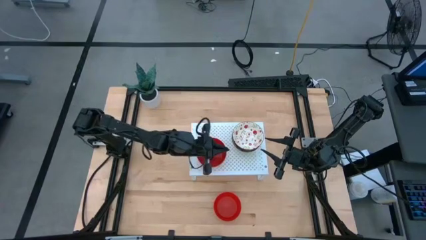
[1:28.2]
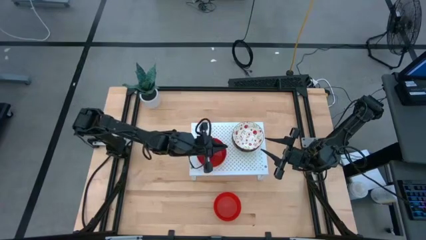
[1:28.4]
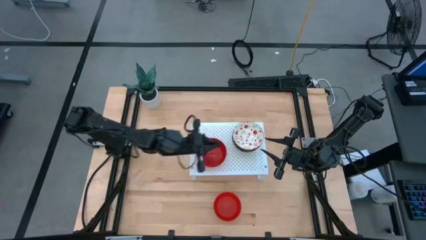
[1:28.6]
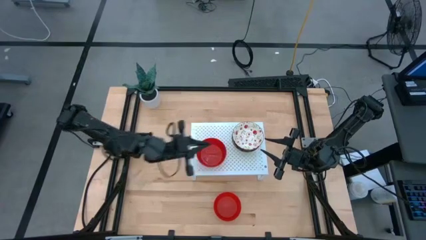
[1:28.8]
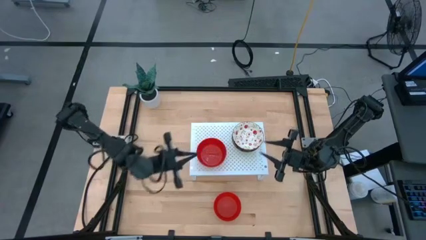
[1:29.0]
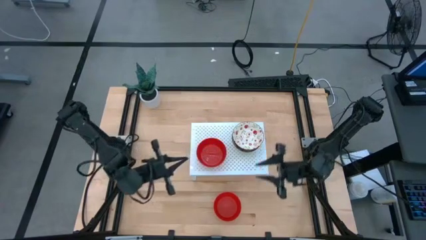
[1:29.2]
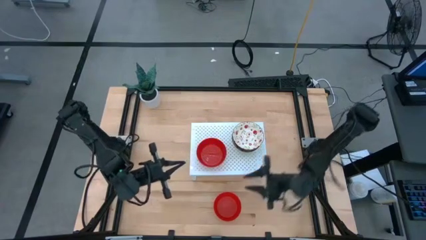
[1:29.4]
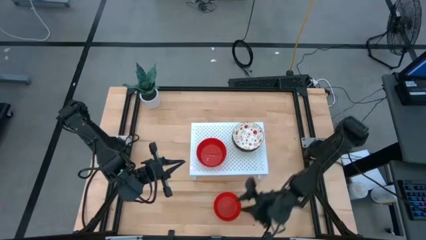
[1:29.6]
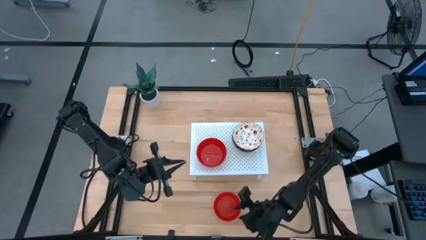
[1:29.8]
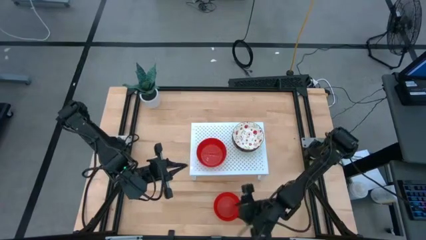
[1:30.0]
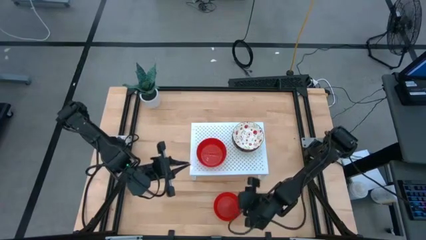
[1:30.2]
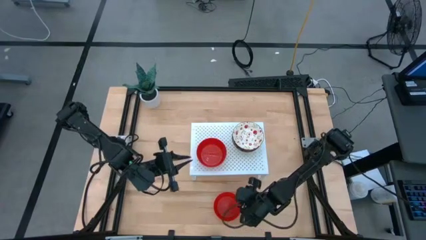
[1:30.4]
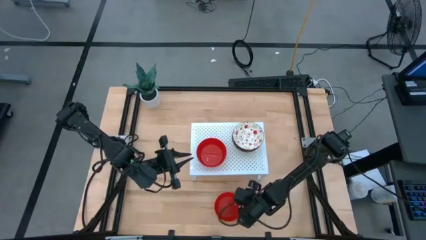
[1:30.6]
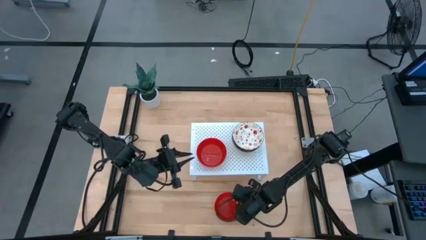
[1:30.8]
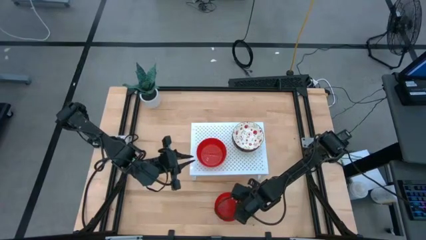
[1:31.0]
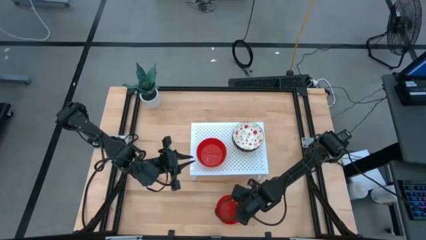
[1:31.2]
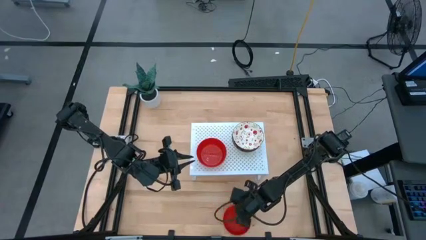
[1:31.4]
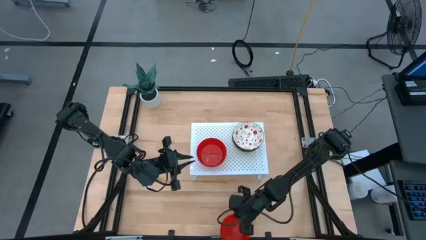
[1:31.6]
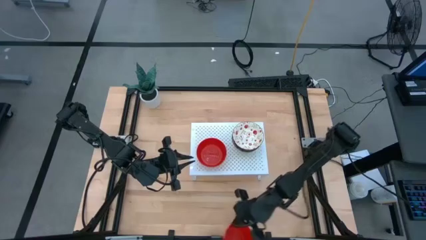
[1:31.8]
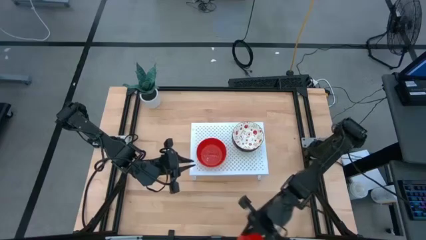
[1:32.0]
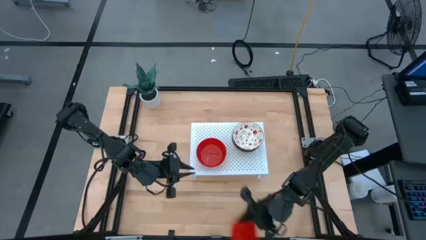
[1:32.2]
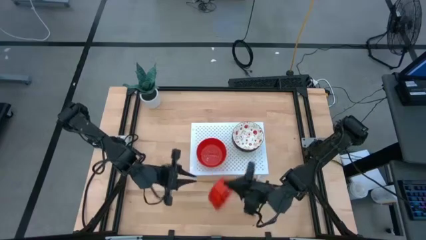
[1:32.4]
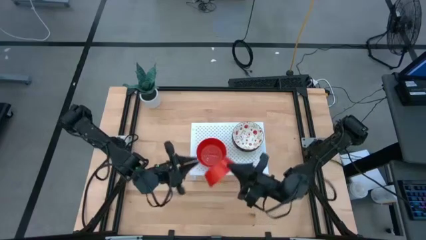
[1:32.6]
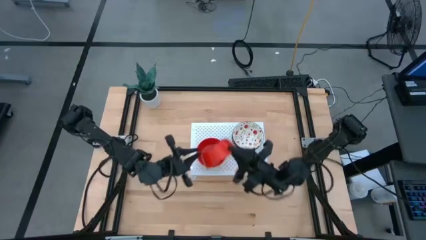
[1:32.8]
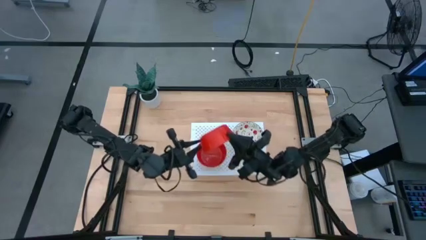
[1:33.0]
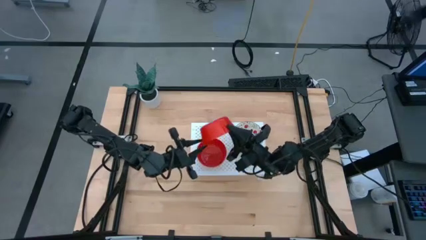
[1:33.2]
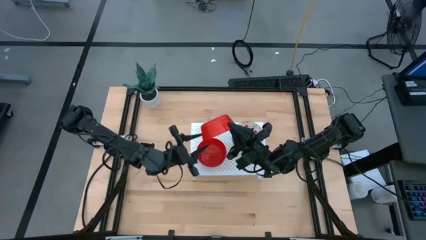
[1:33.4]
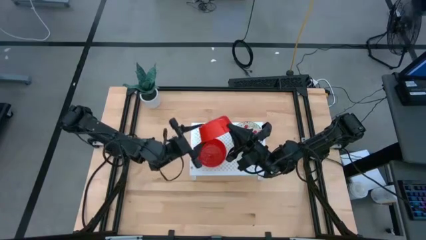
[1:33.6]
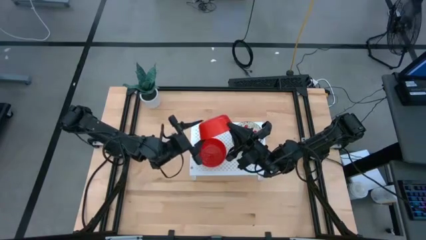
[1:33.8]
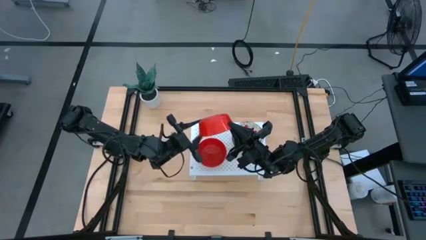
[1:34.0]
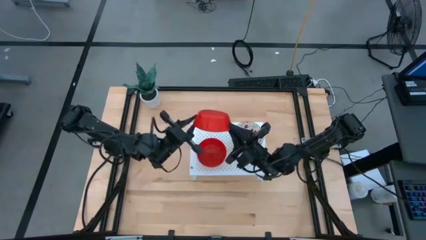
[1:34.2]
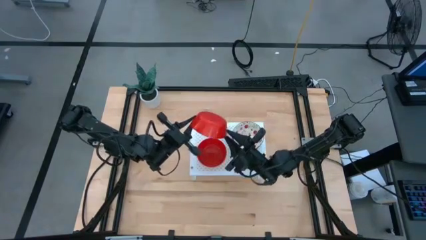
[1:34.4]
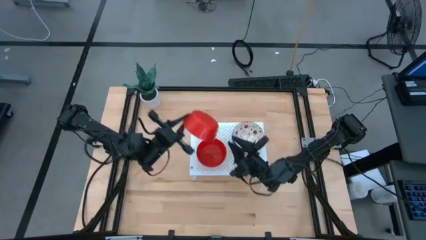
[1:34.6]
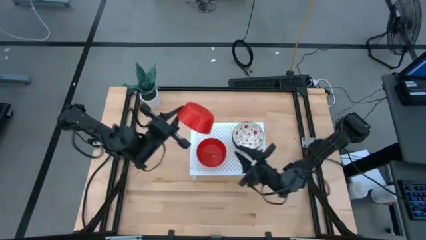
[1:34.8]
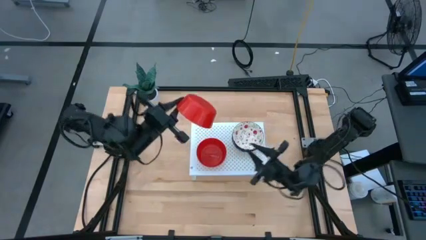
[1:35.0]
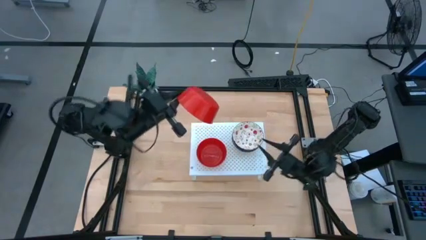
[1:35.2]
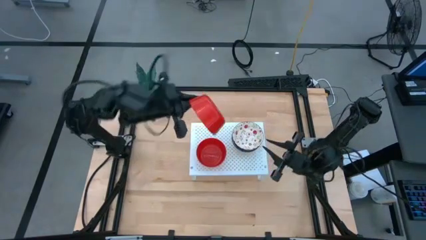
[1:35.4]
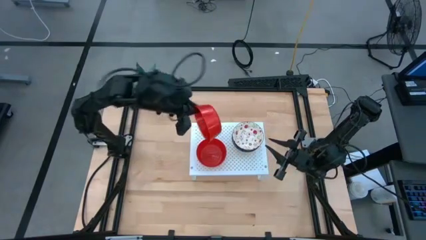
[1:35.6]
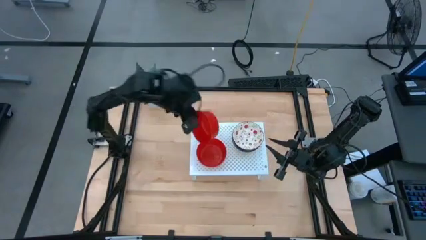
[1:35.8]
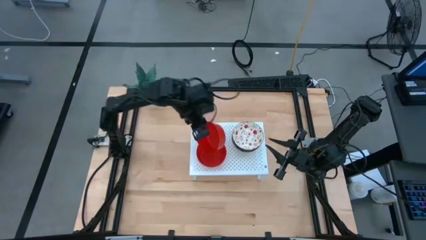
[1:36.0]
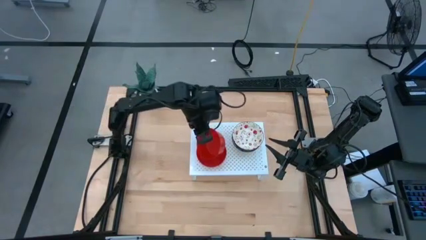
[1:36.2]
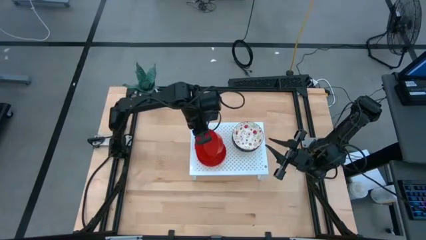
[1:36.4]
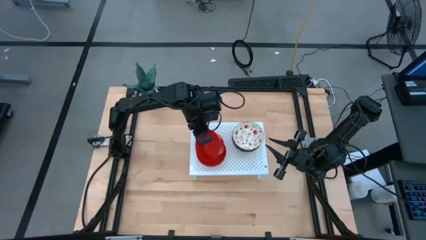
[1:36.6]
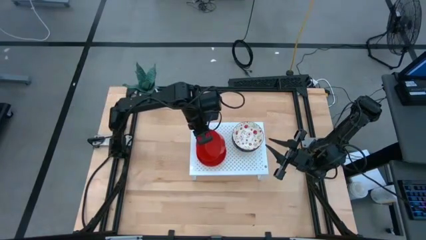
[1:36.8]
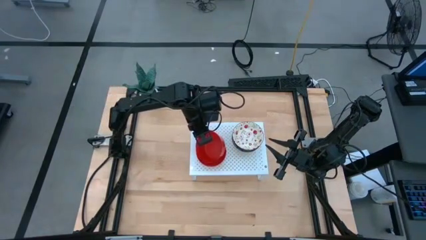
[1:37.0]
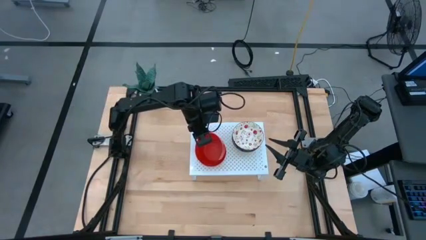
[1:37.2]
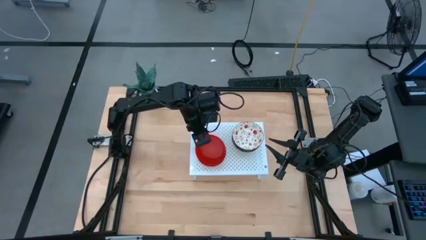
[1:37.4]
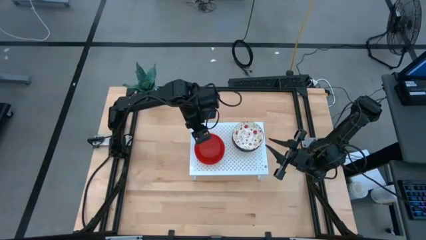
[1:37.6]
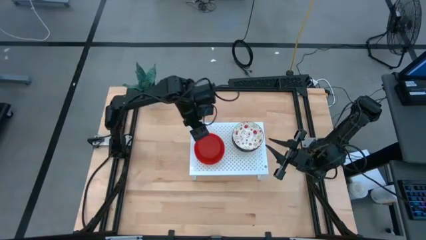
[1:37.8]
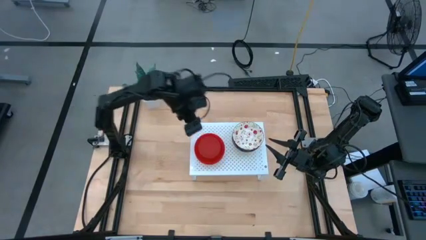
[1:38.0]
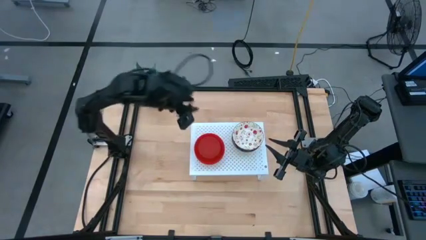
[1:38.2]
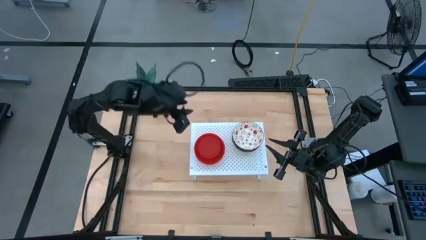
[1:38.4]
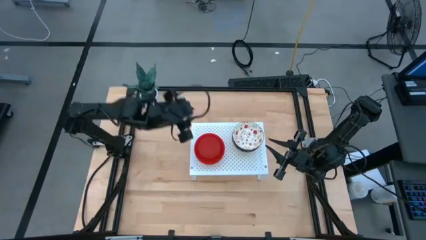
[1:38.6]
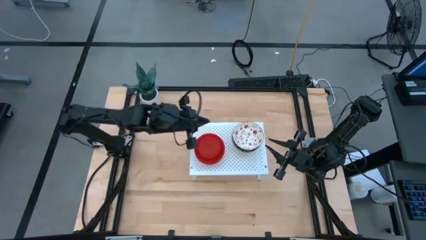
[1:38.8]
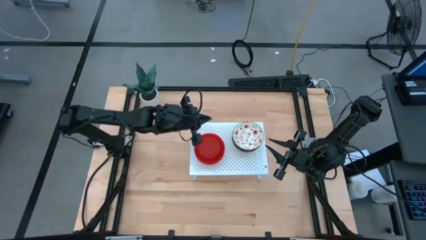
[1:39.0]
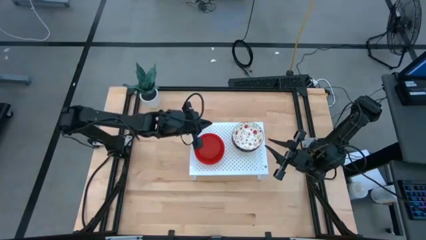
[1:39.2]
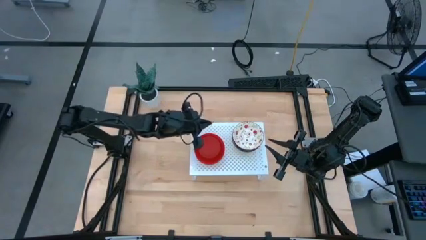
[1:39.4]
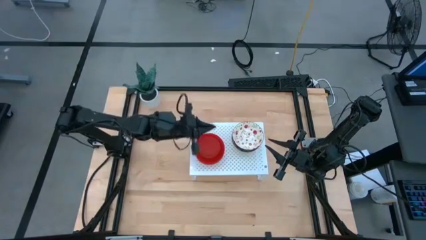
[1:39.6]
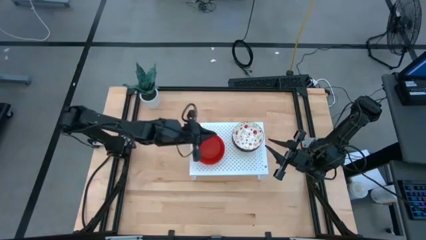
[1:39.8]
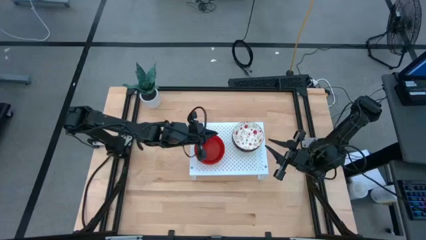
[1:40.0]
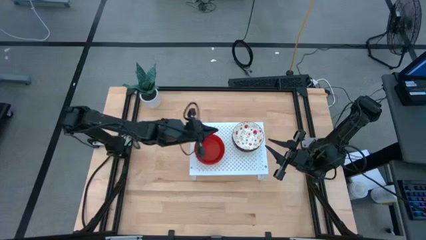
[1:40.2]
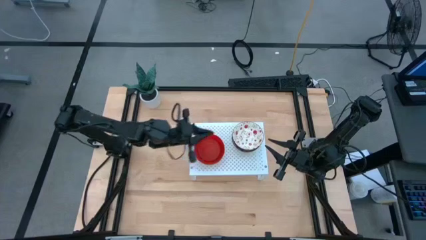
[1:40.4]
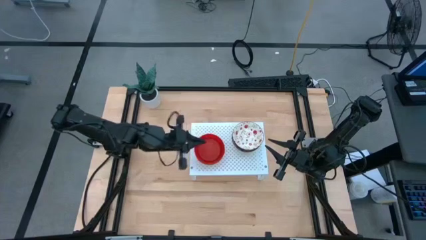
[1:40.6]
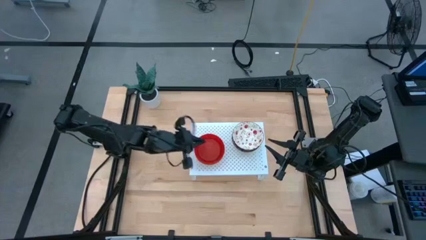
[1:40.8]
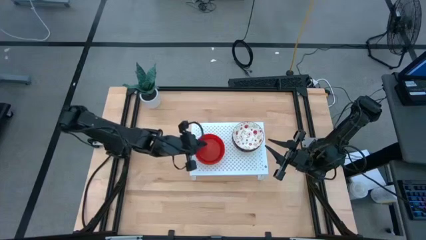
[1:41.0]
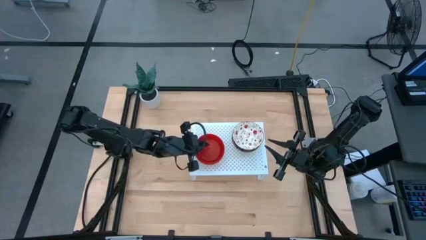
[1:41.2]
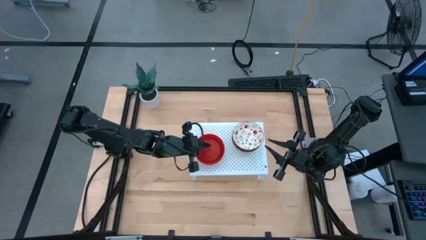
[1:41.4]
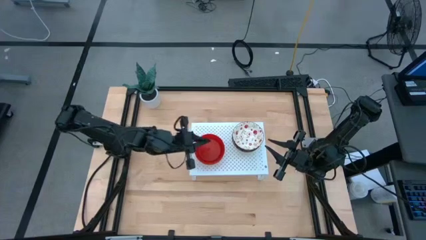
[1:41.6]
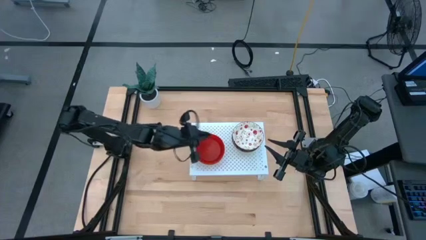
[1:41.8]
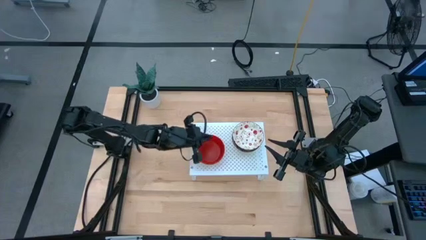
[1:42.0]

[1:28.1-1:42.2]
Task: Pick & Place Mini bowls
Stack the red bowl on top of the stacked red bowls on the shelf
